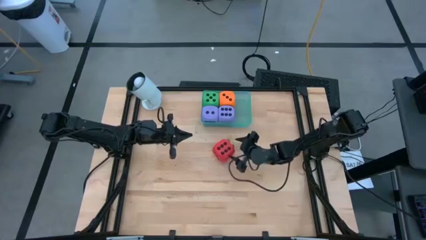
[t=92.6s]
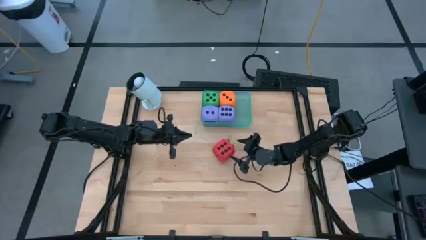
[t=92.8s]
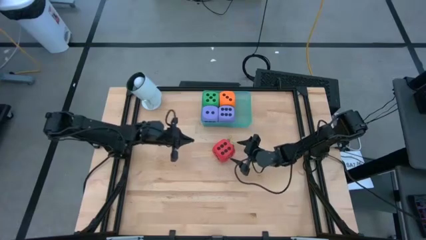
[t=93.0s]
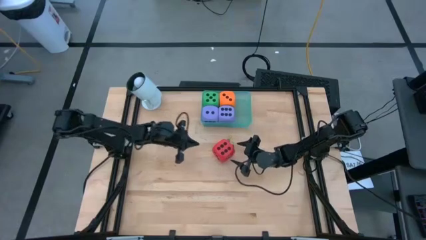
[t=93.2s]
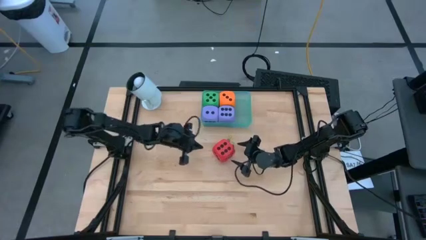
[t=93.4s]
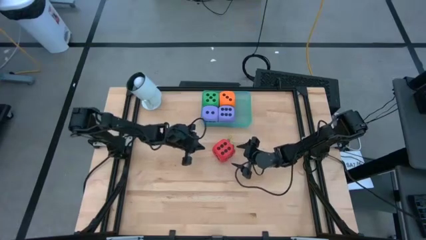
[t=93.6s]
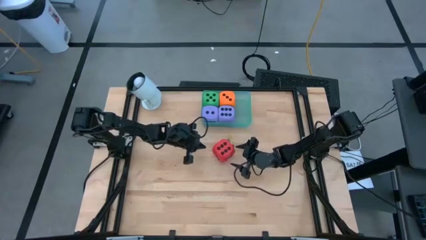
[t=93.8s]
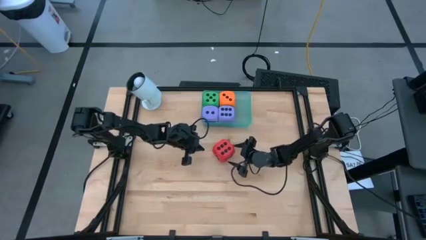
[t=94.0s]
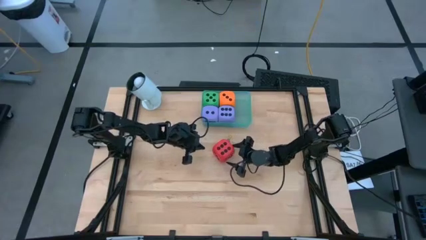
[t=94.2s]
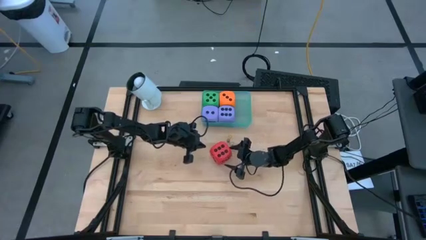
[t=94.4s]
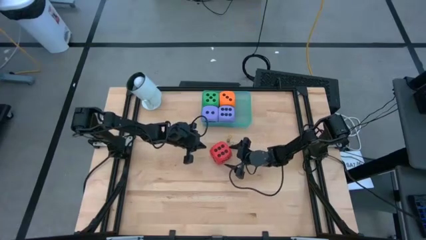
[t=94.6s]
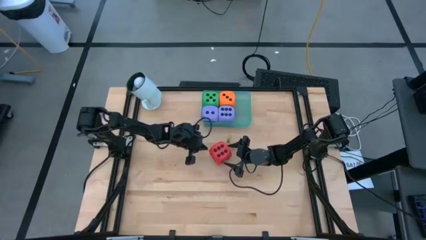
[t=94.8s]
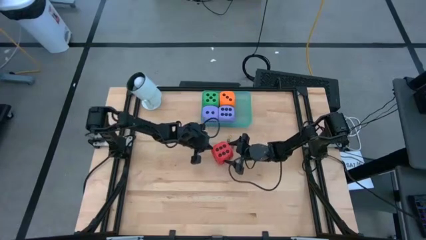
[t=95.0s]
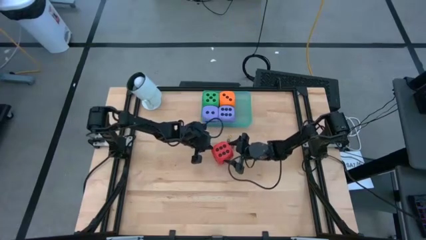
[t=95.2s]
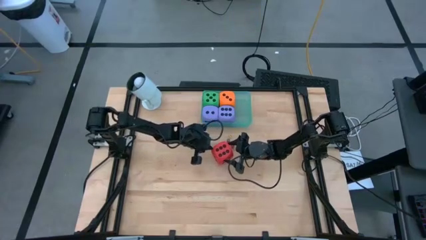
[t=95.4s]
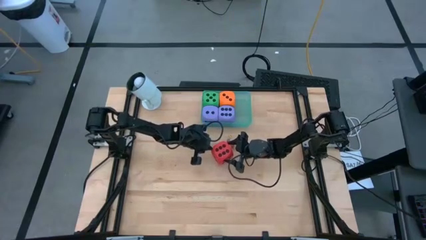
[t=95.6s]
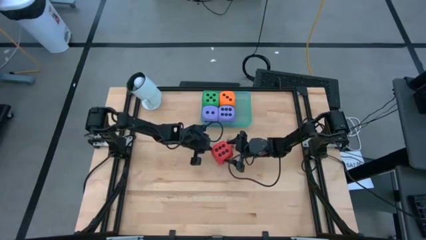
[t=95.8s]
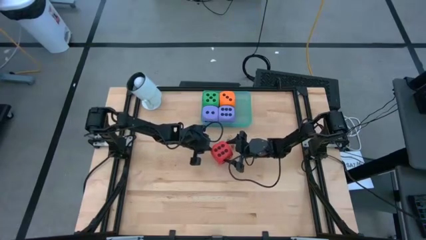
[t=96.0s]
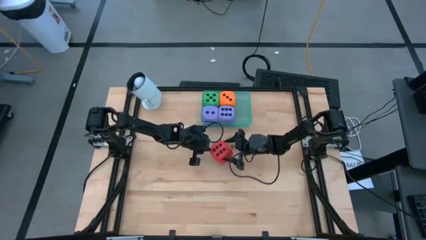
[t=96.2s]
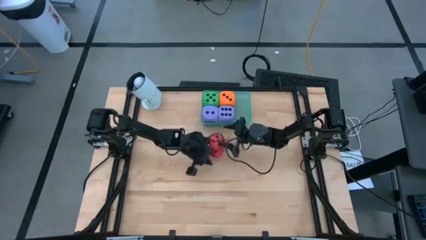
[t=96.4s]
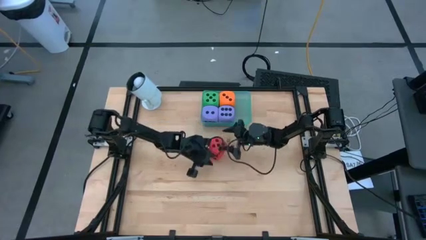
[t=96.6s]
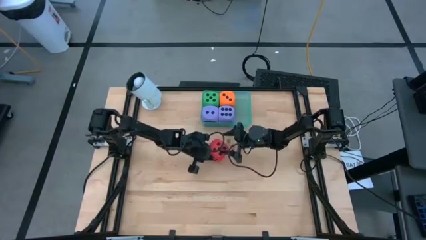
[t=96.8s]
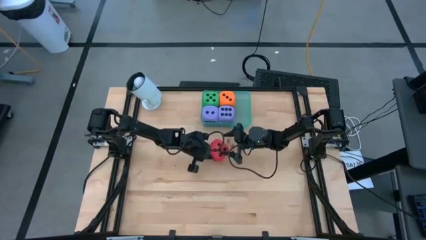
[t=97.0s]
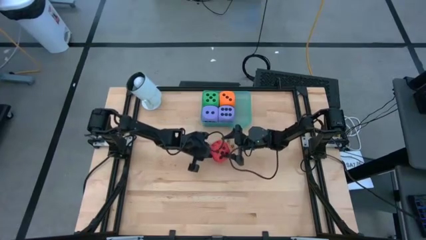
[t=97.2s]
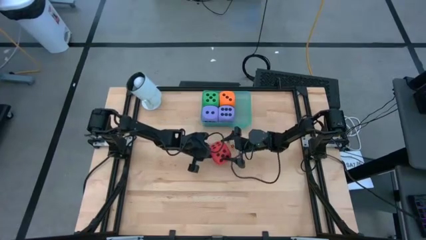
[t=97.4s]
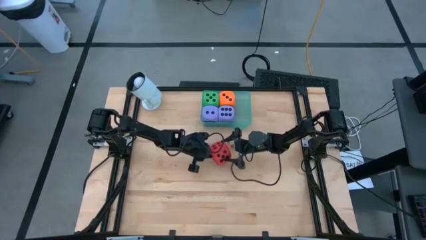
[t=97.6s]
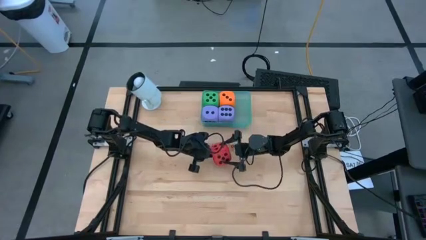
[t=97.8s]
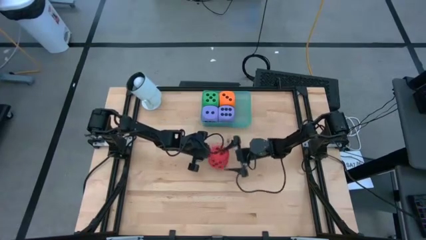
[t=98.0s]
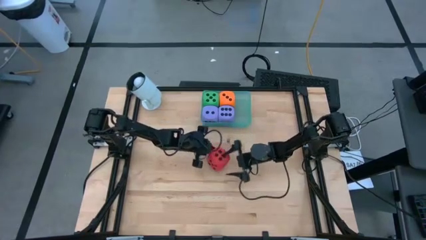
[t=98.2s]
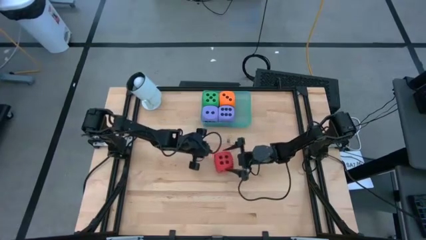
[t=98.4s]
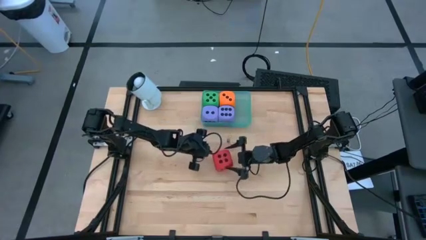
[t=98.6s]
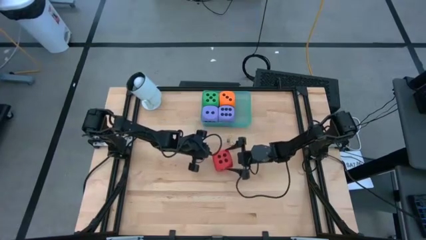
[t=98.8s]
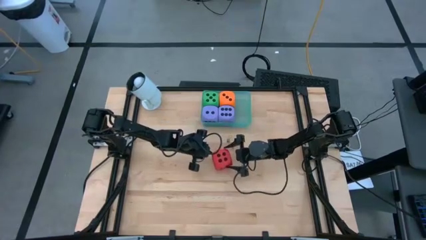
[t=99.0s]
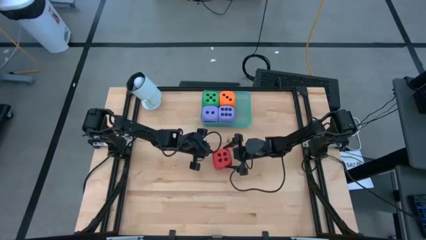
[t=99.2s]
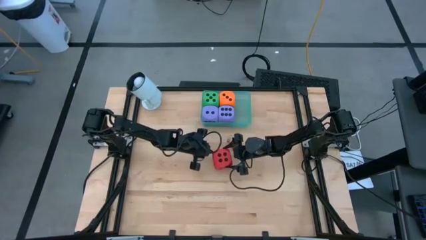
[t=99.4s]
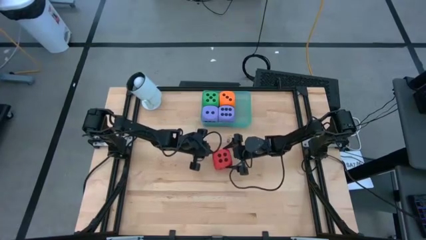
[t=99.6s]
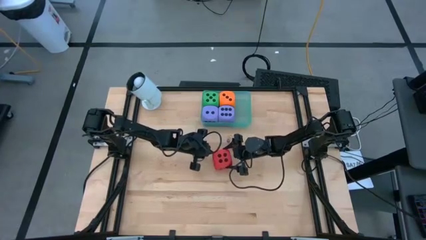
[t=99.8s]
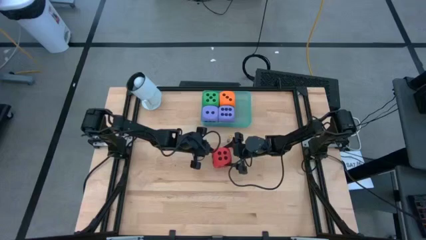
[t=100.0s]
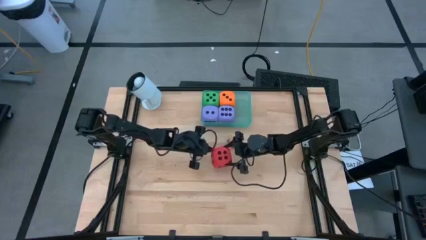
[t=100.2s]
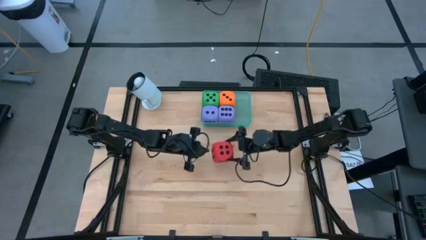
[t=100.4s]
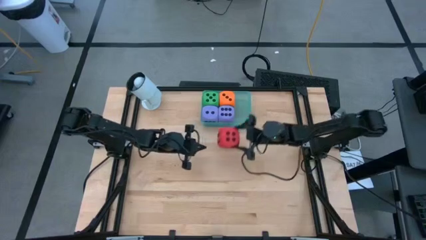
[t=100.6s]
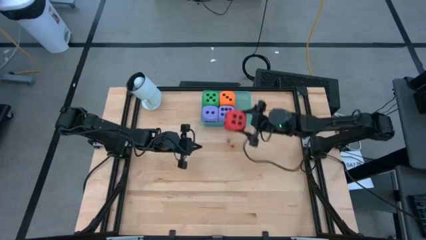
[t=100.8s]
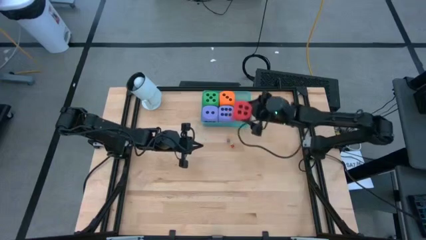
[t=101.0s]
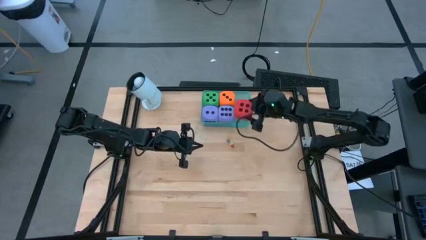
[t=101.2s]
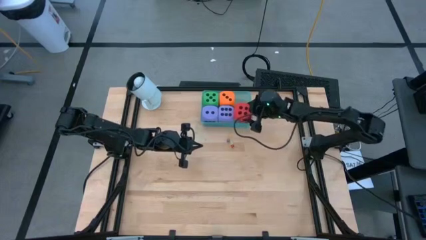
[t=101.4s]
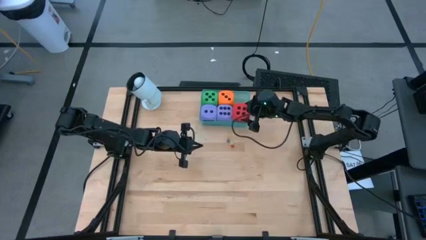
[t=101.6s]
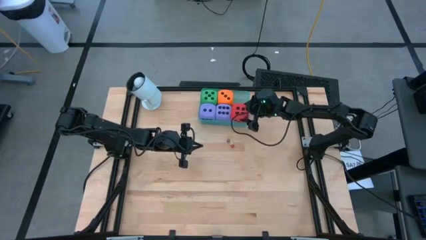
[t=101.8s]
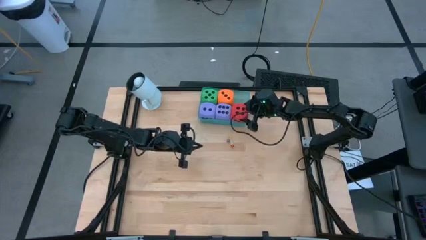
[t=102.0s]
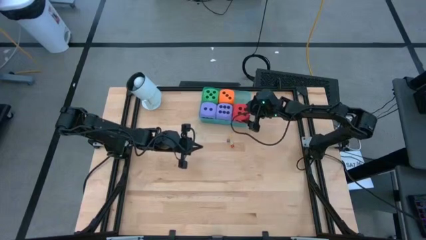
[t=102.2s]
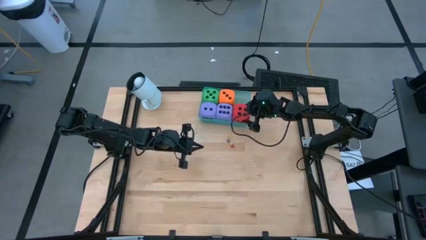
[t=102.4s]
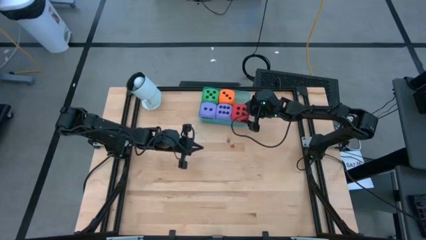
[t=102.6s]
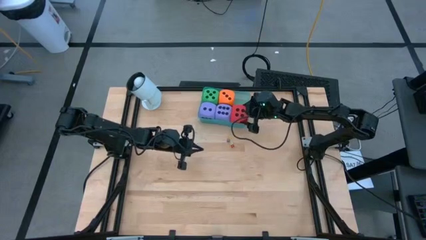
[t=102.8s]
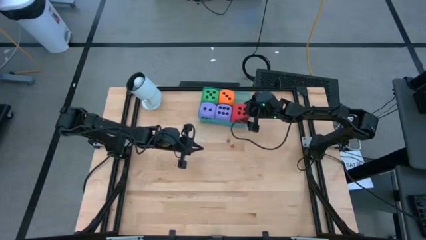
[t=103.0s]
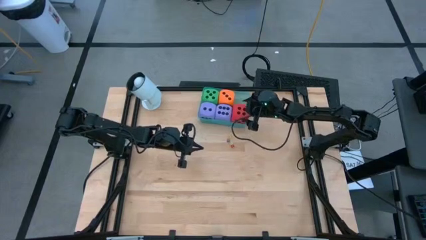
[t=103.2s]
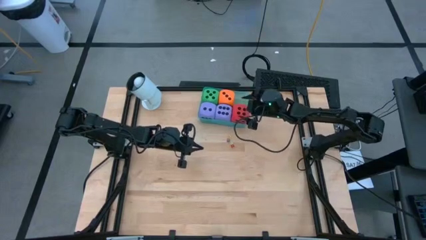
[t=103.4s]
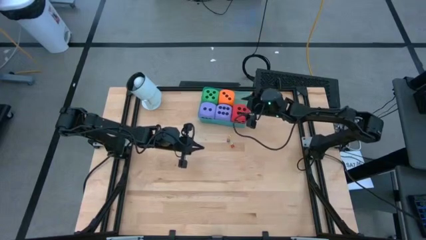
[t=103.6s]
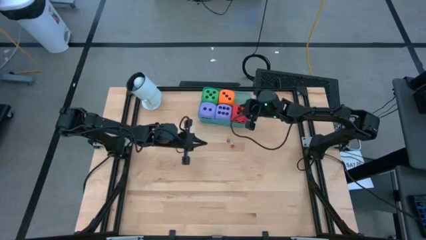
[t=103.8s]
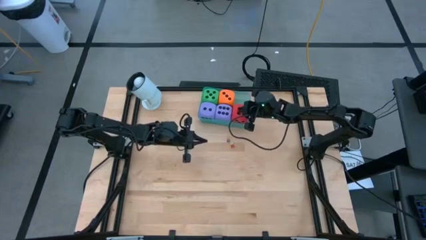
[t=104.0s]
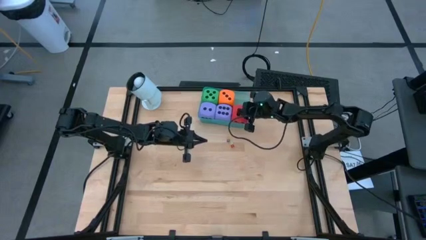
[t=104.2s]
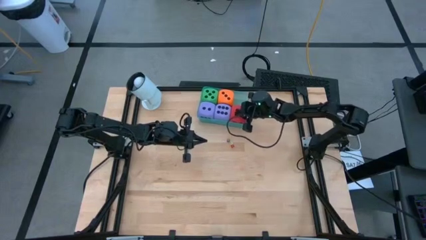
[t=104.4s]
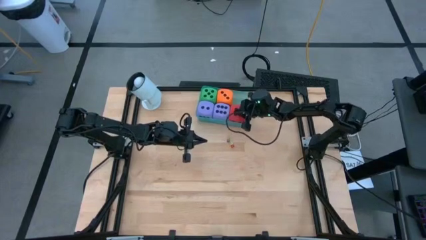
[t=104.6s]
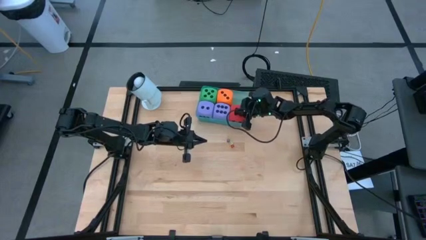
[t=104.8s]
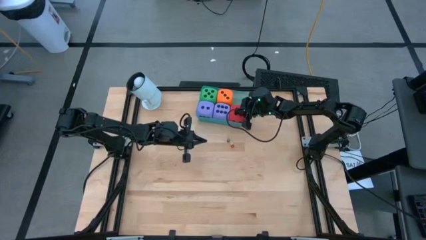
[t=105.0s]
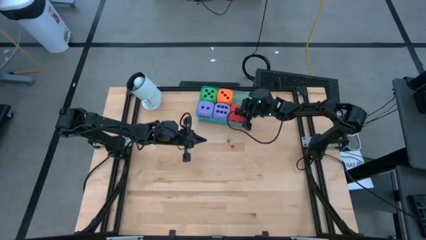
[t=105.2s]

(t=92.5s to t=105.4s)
Task: Pick & Place Dice
Put the large red dice into the green container

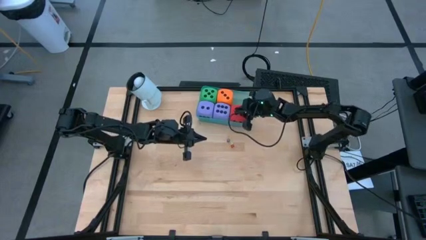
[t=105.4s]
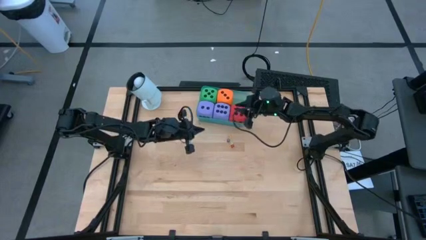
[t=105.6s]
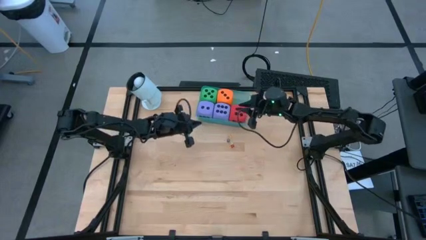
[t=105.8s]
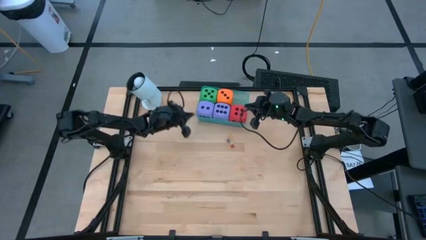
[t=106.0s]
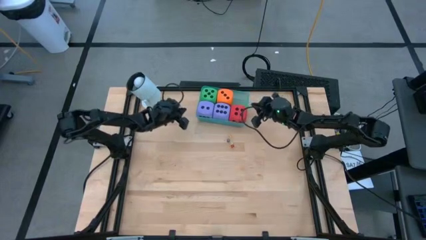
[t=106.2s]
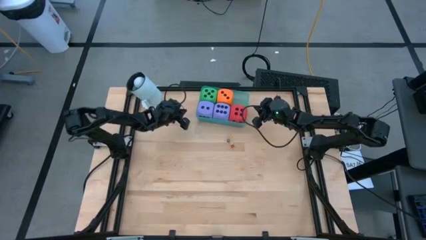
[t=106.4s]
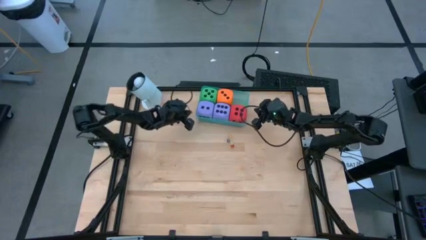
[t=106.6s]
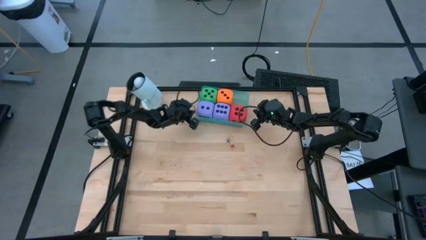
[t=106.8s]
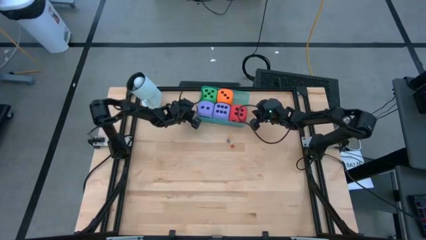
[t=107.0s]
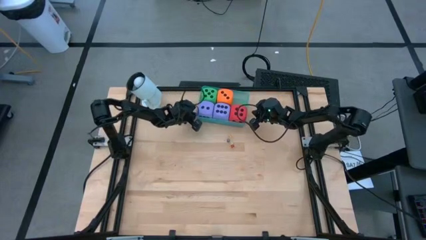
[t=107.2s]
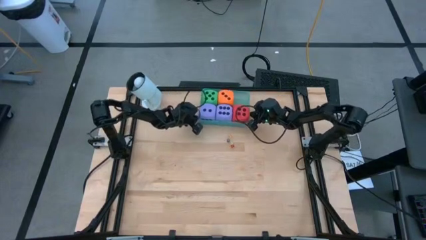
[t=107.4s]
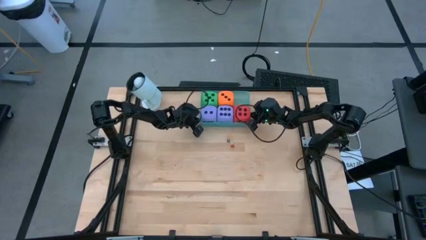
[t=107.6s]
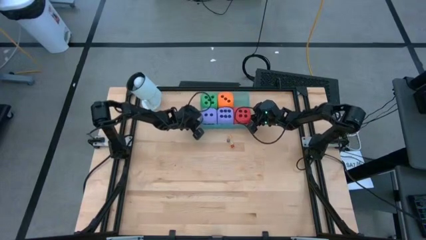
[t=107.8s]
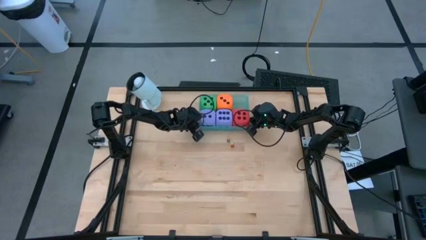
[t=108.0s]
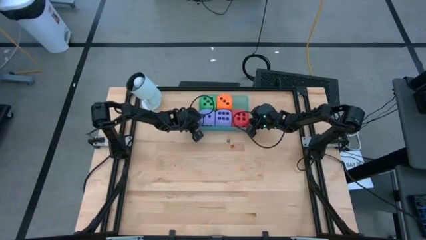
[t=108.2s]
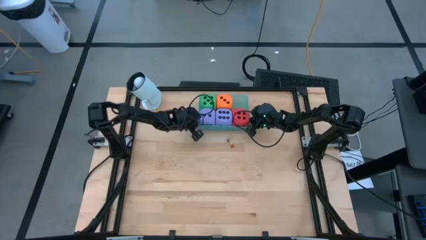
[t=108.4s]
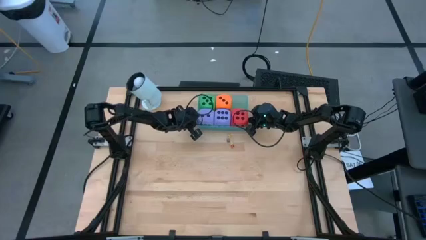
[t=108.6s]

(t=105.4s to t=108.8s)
Adjust the blue bin
